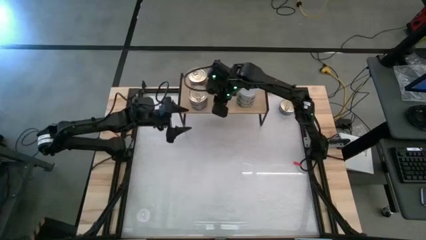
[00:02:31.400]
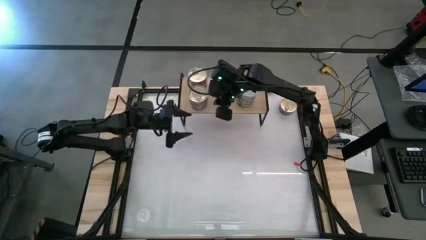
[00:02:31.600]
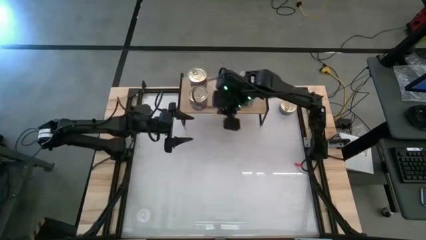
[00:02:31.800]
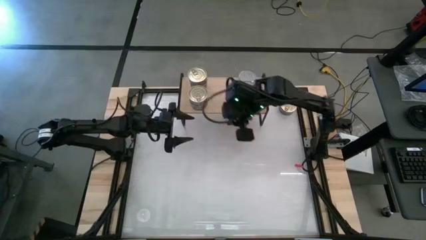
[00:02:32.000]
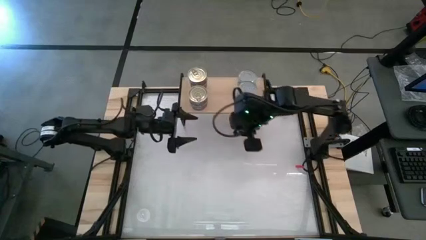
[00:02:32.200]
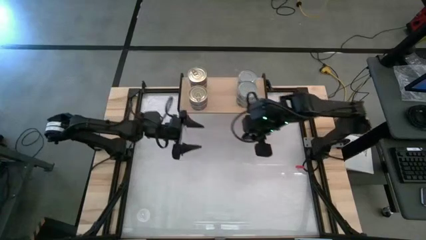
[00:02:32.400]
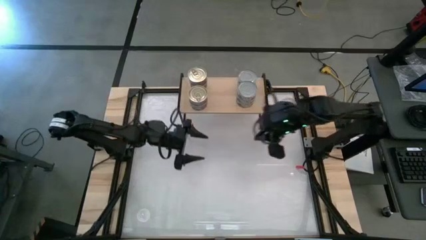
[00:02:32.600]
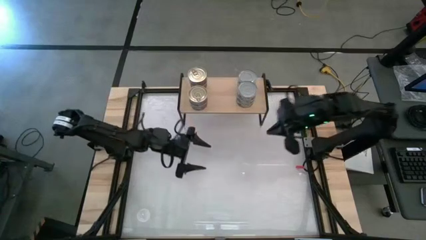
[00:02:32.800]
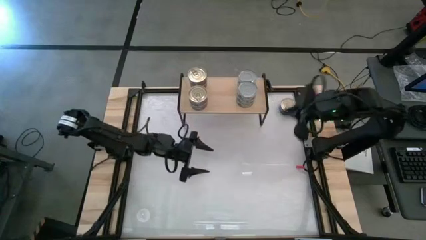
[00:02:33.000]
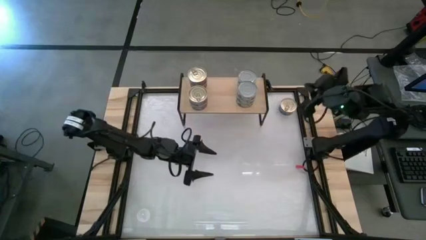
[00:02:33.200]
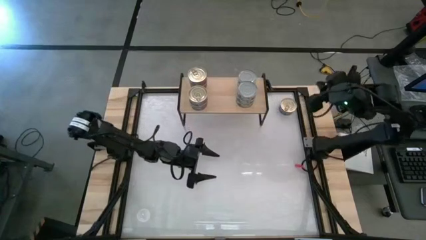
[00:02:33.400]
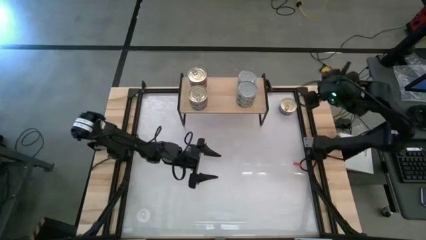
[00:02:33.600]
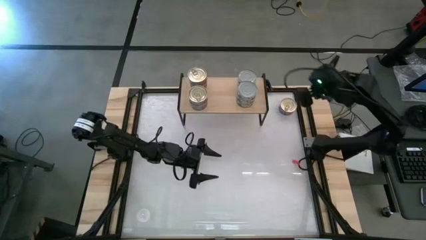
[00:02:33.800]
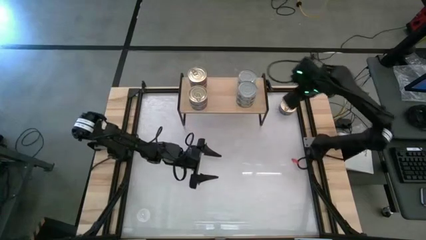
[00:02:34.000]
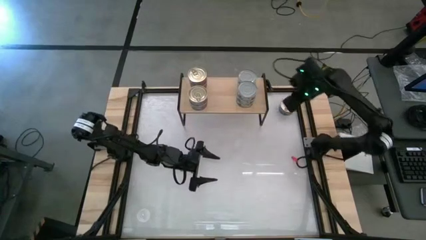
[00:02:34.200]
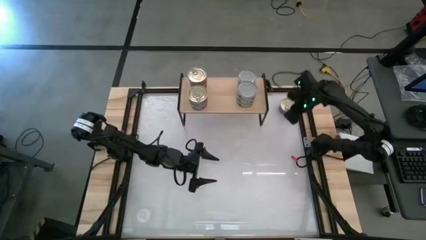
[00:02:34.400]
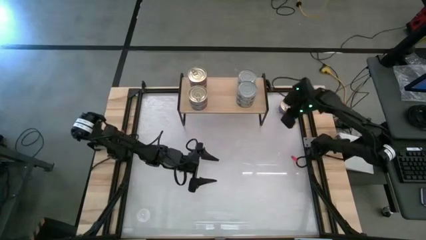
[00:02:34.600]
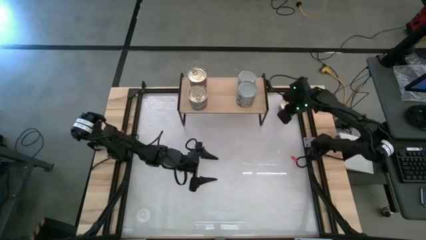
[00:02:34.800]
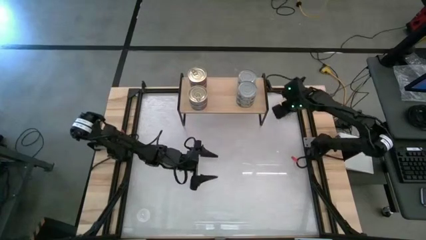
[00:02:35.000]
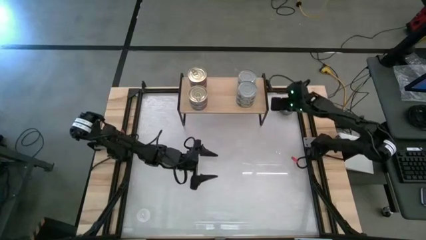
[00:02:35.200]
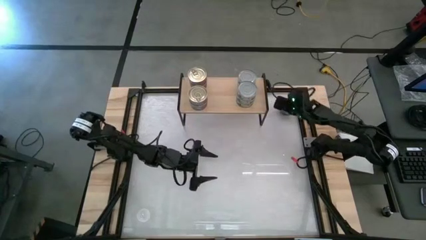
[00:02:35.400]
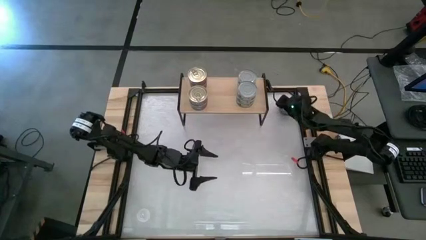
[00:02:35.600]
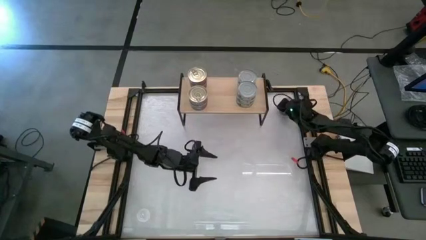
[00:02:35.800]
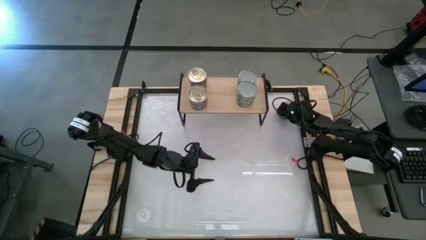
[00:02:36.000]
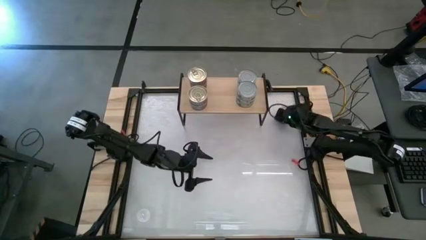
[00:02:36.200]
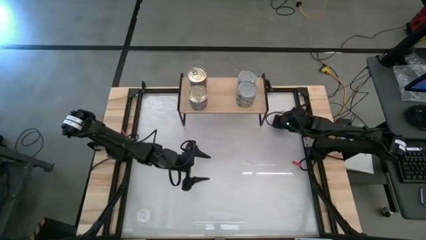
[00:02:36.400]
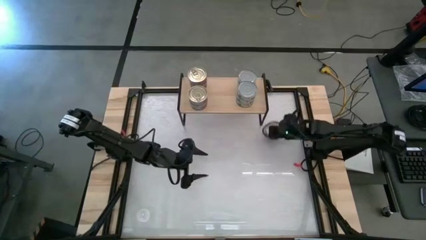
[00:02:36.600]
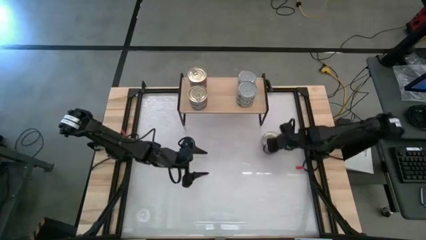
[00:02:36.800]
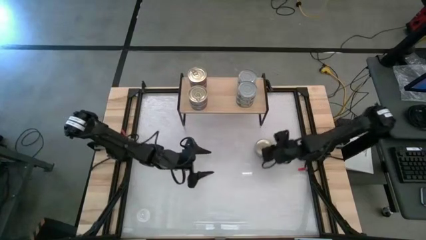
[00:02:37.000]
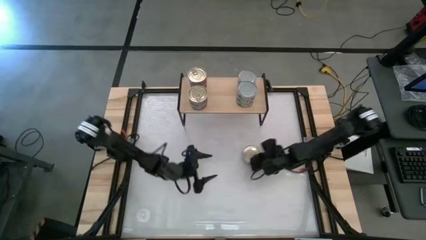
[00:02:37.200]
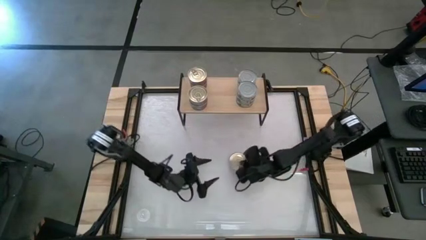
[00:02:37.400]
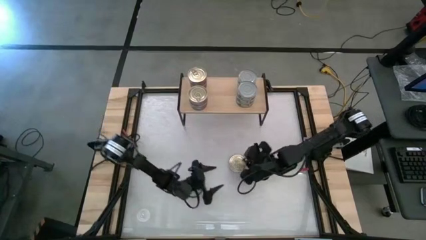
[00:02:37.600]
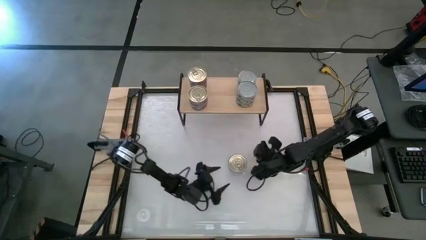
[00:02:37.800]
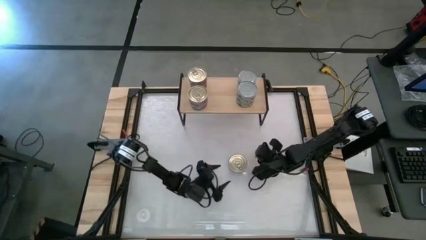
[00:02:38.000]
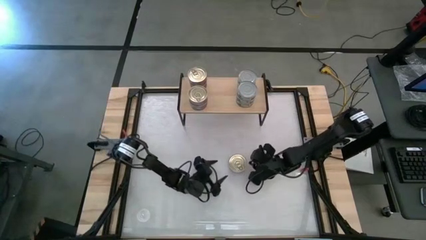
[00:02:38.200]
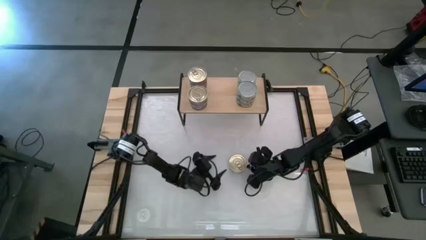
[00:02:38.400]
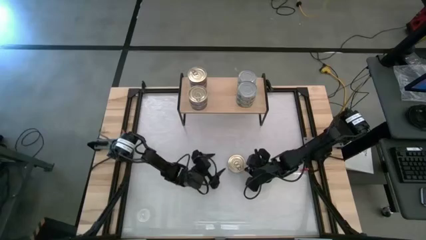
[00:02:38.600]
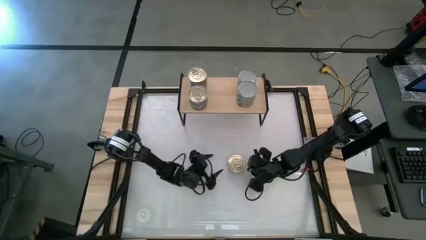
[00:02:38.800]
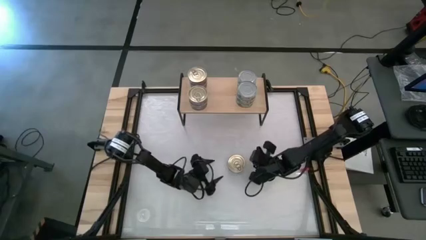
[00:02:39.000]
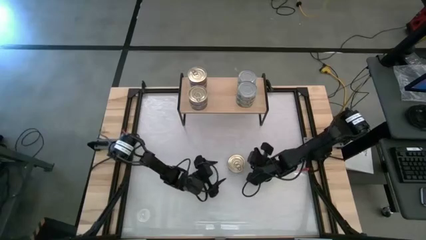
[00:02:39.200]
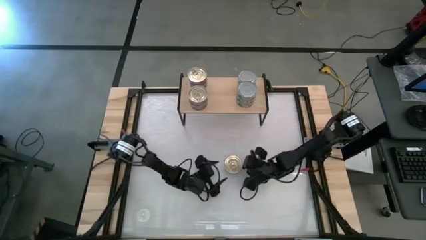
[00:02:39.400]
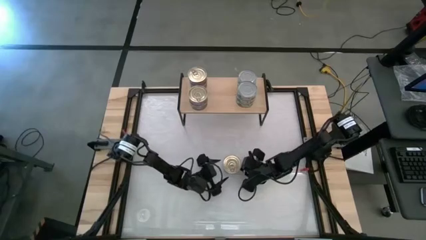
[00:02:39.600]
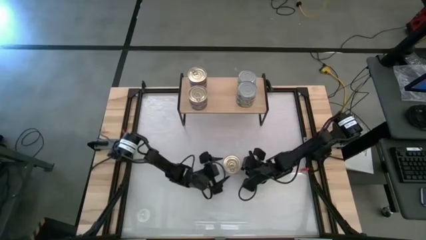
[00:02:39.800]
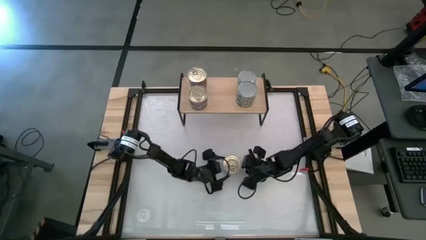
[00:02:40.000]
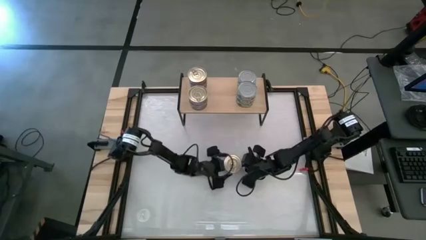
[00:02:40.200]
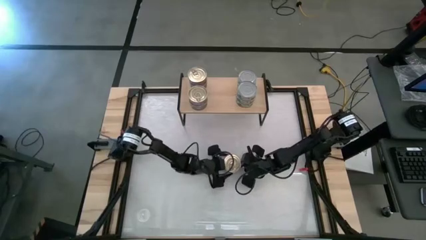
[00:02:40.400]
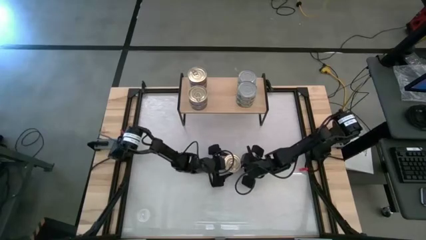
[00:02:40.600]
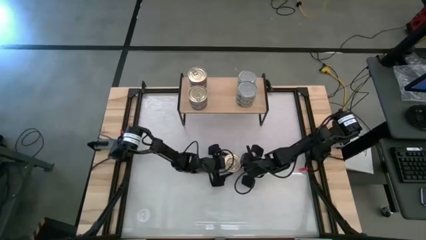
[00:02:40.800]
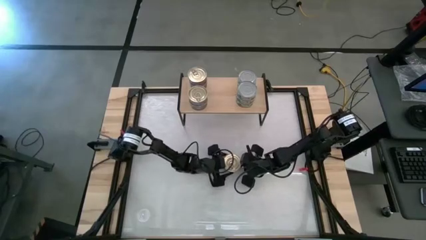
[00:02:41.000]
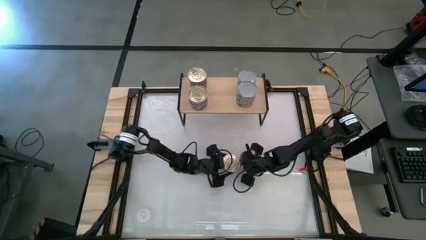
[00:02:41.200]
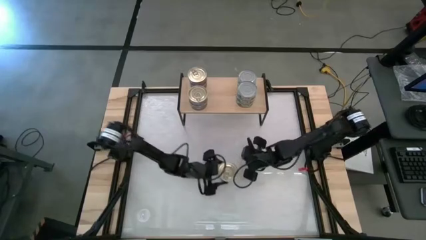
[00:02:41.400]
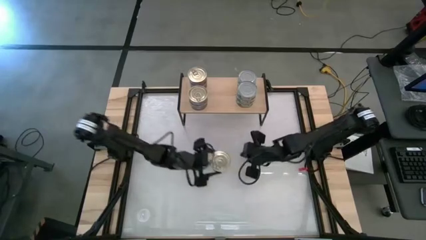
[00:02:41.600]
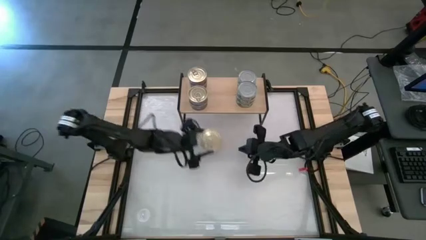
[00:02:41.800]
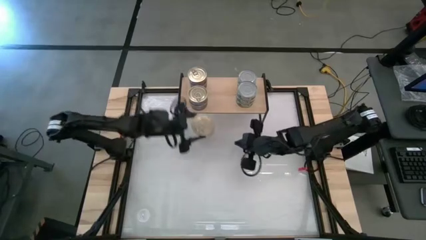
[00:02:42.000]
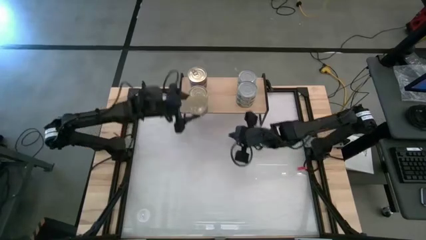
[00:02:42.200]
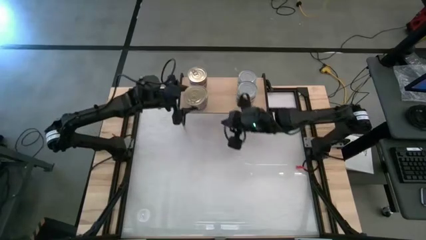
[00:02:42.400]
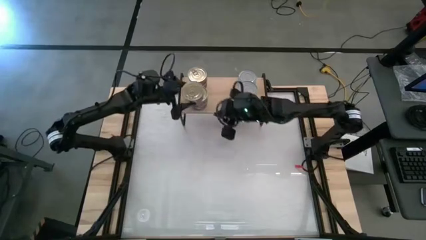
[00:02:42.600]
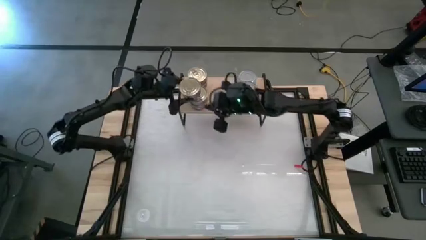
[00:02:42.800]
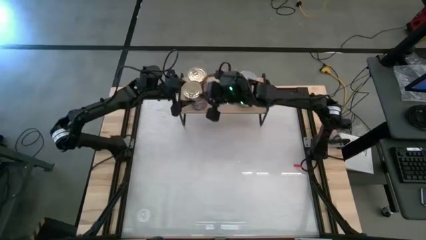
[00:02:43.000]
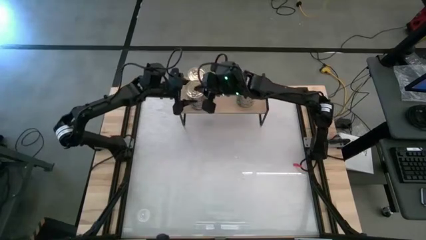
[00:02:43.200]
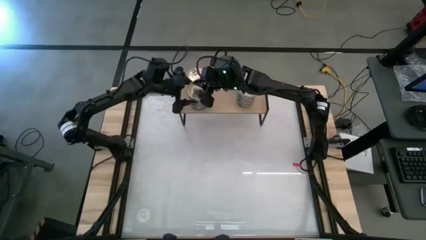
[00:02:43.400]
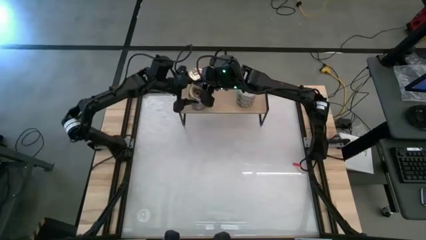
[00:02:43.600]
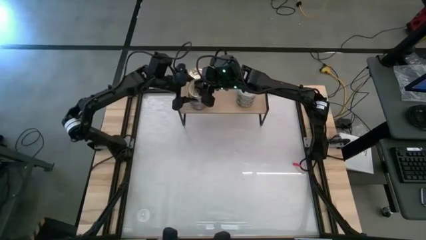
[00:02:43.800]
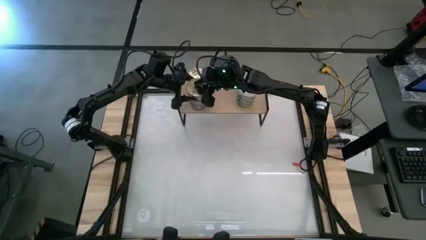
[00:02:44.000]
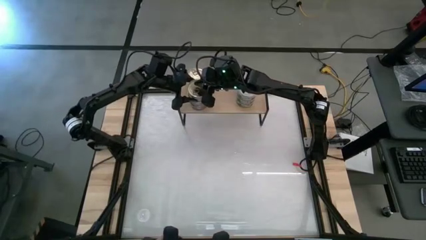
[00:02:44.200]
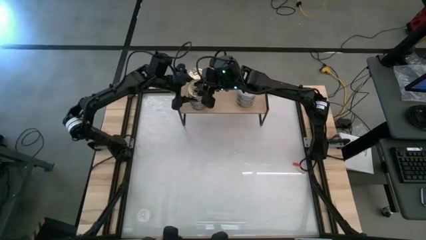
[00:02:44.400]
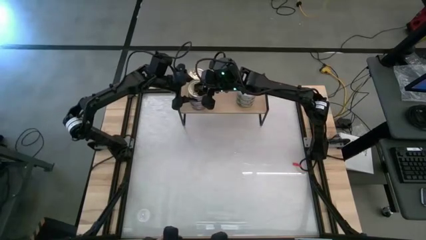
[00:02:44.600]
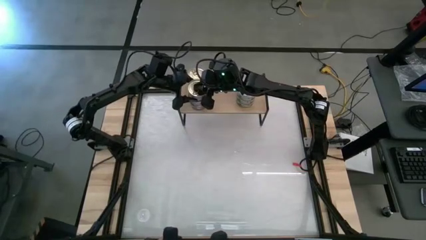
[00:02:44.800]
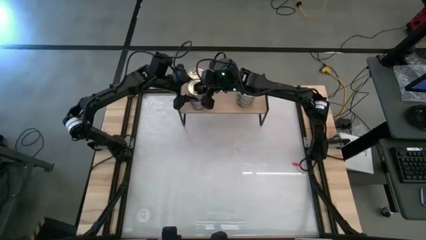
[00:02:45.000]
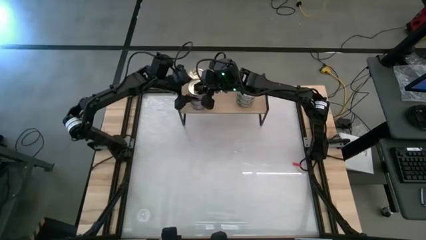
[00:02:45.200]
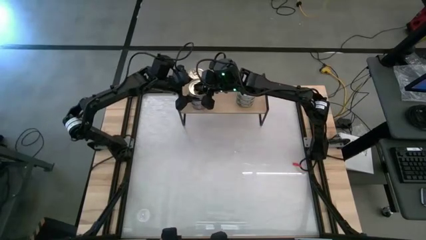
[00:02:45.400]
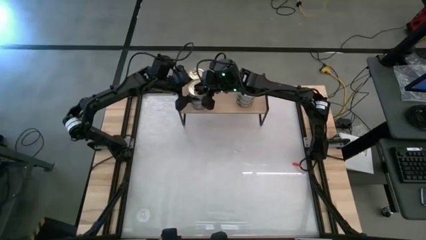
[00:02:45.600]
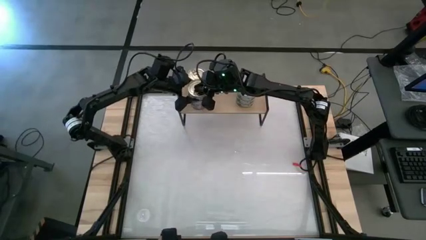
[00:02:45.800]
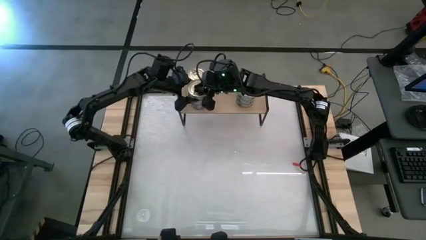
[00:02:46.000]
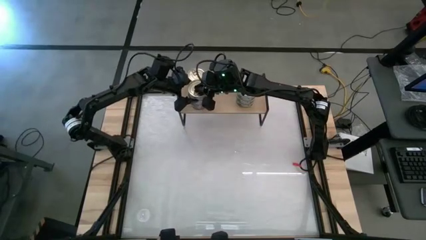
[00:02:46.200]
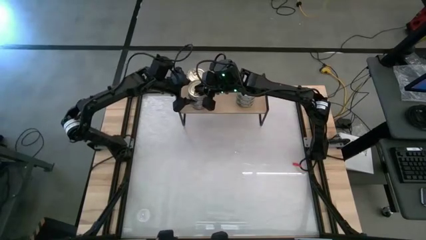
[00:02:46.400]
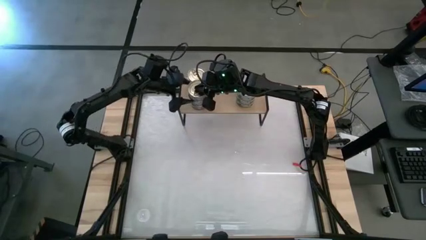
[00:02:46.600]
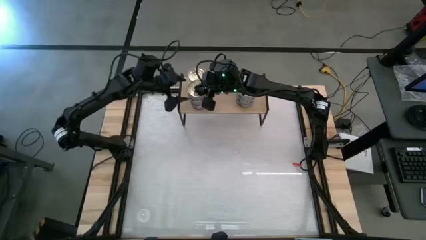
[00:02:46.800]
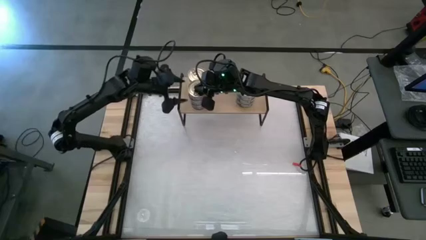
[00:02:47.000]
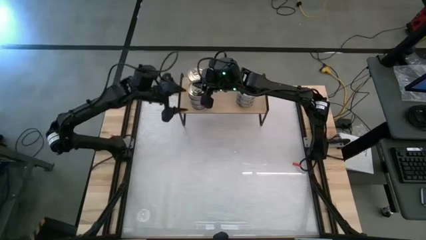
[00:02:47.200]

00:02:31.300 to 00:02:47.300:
Task: Stack canned seafood by type on shelf
Stack the blue-pink tuna can on top of the blue-pink tuna can
